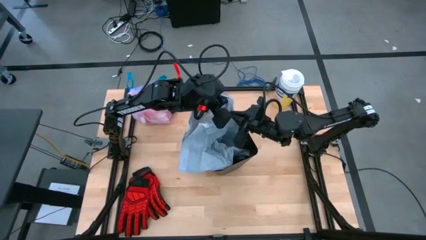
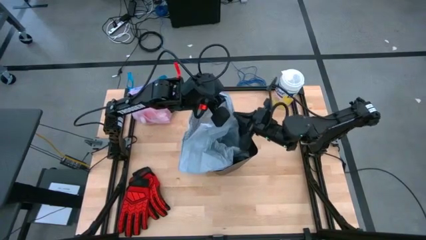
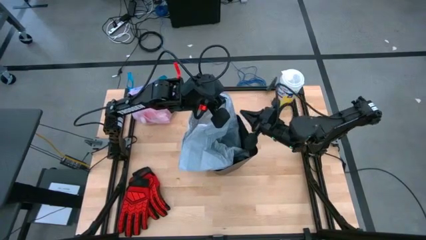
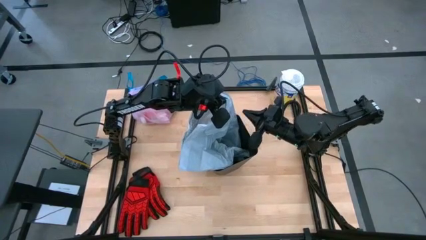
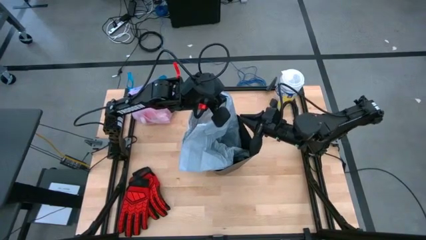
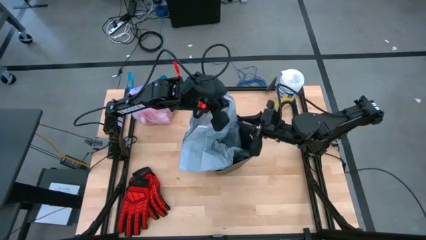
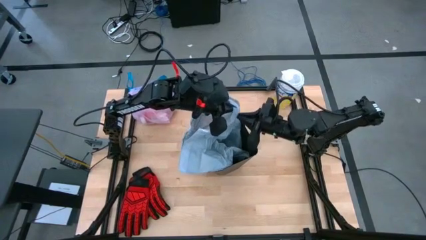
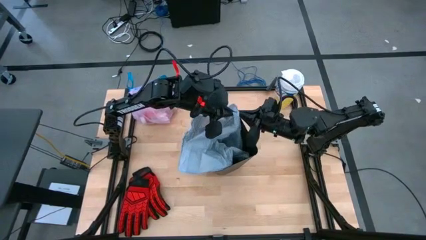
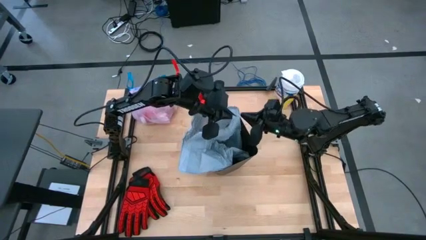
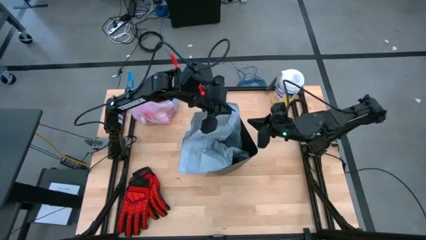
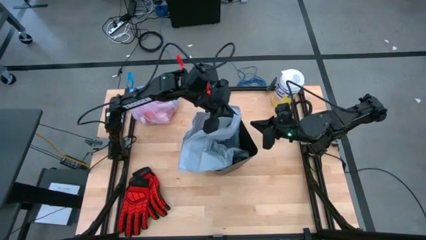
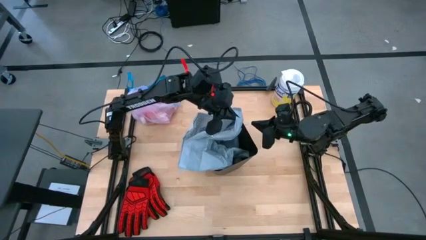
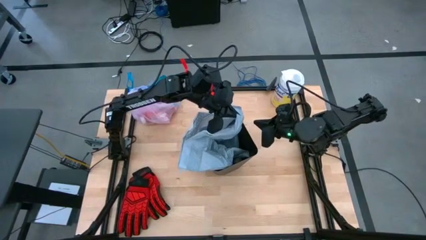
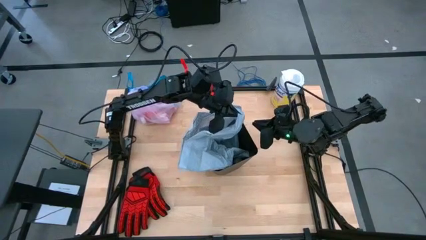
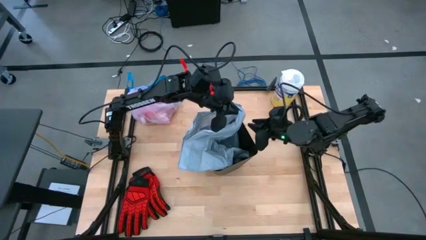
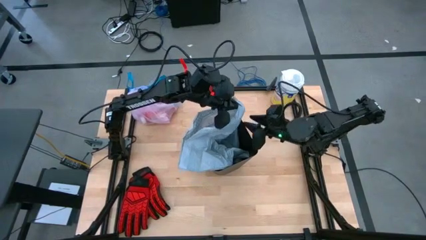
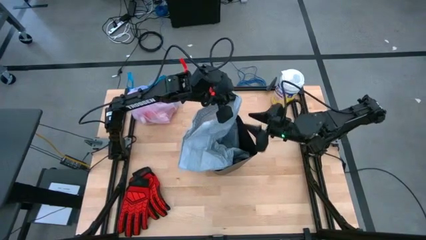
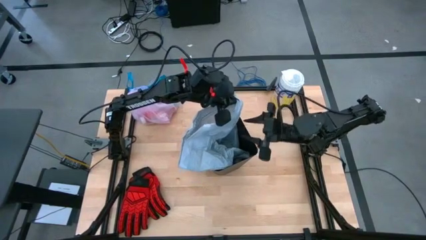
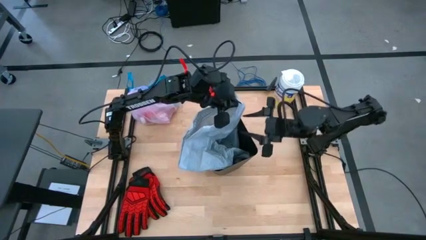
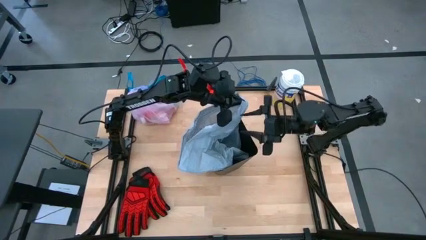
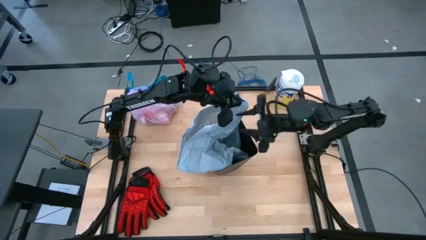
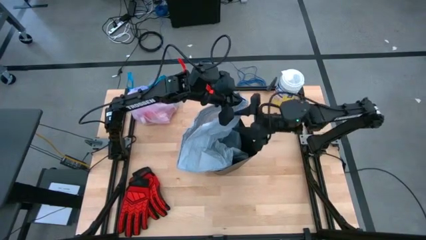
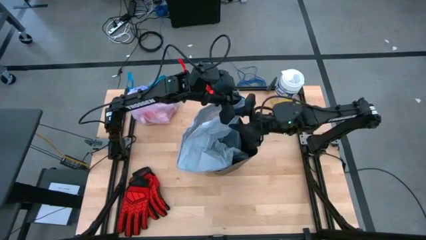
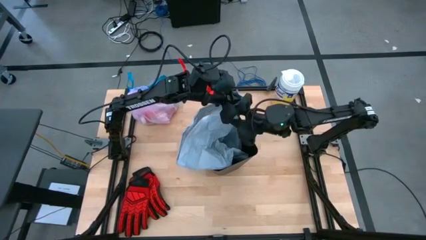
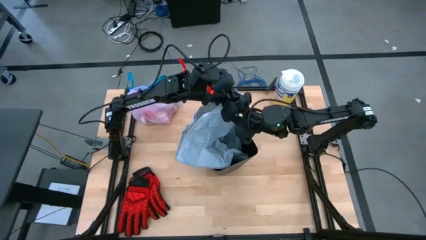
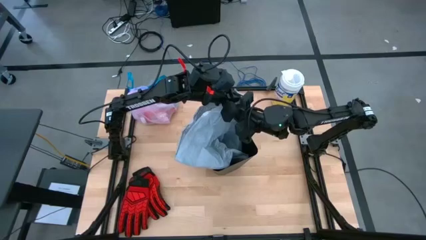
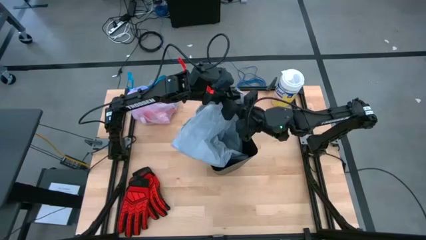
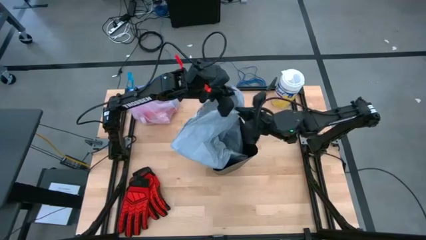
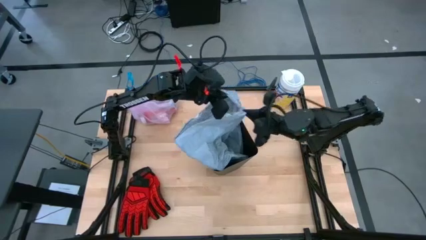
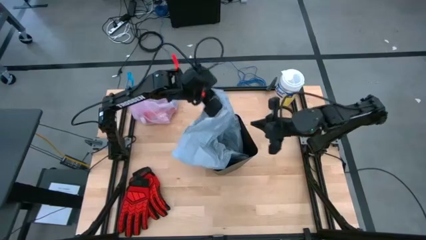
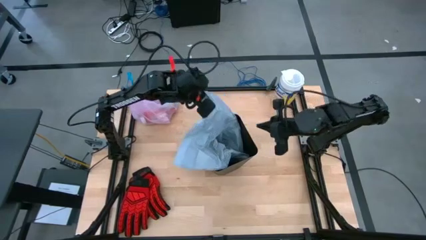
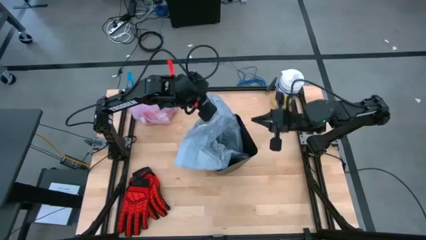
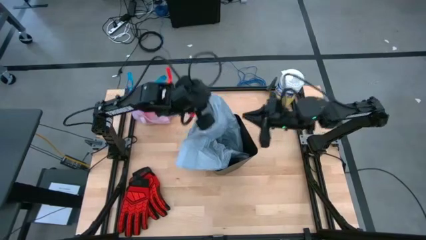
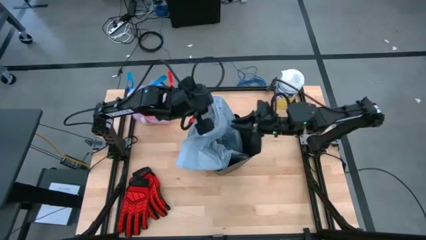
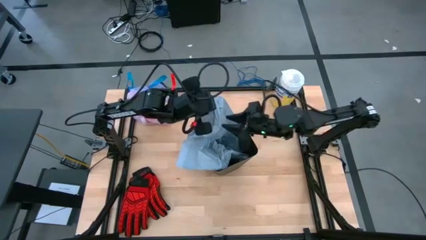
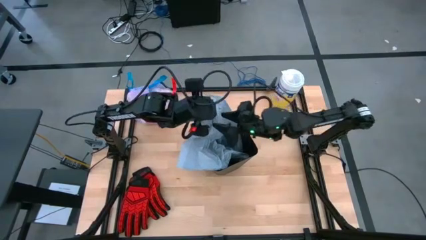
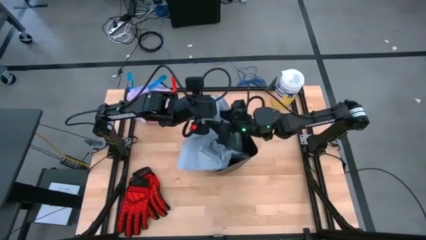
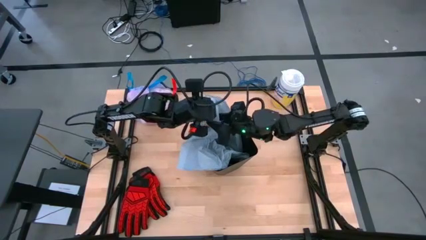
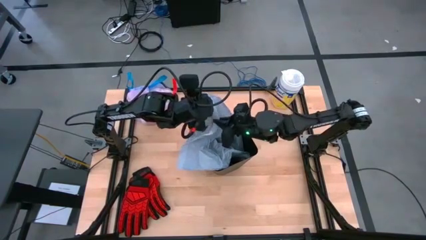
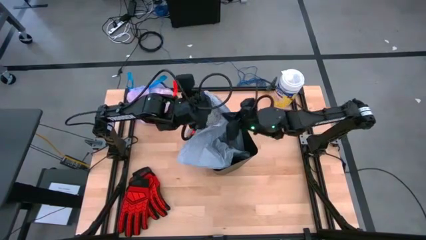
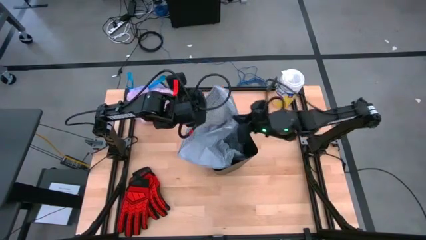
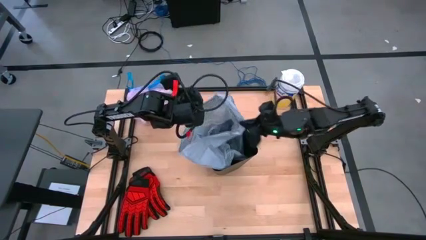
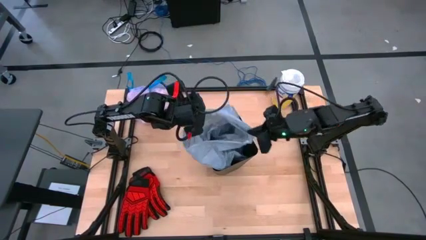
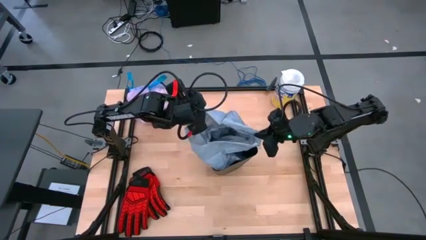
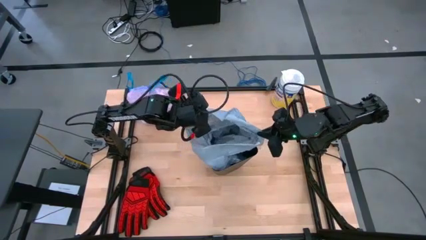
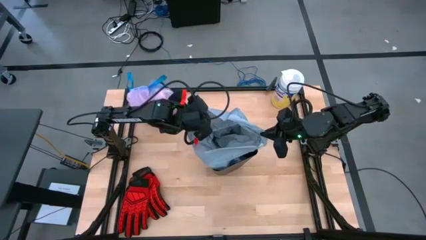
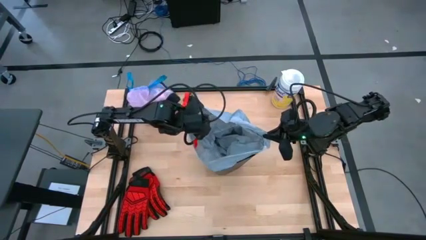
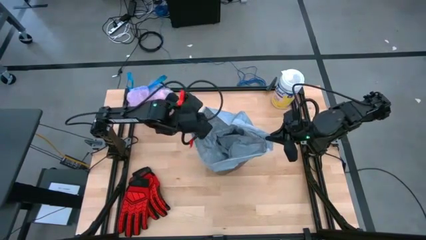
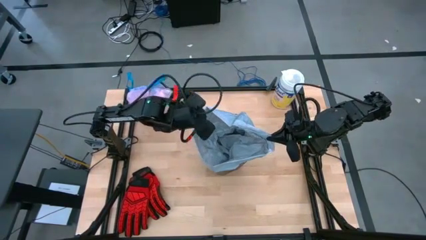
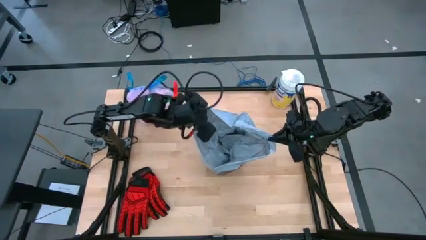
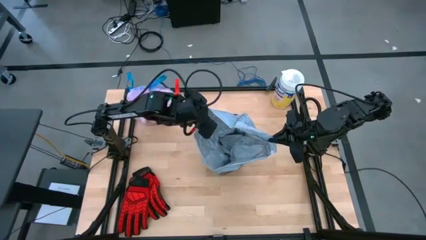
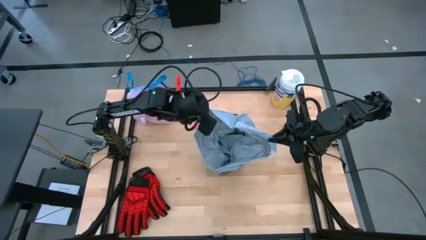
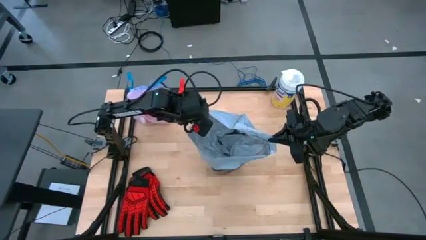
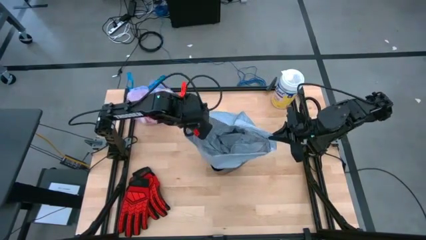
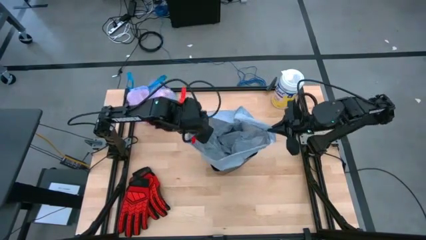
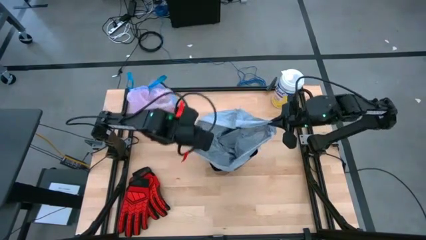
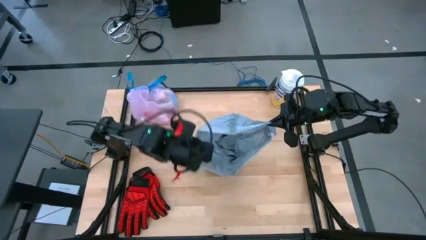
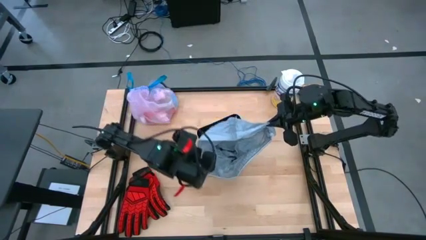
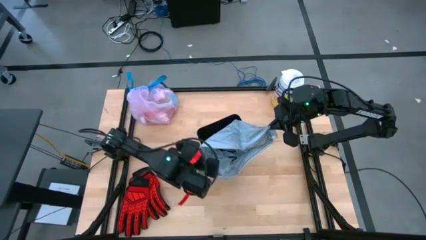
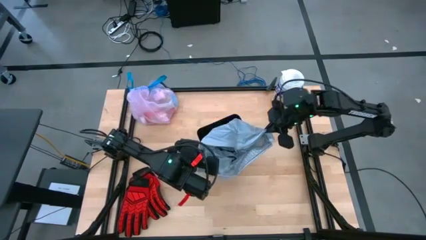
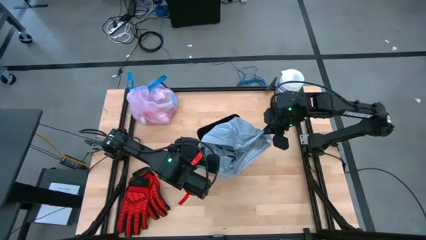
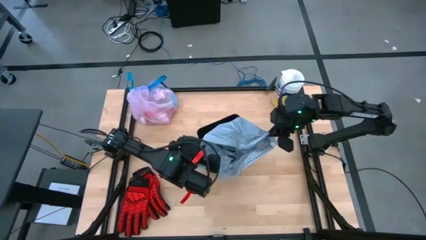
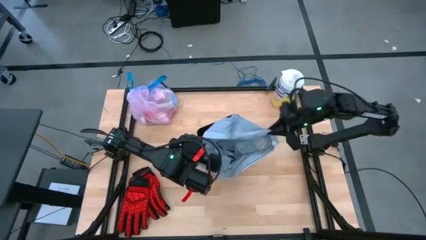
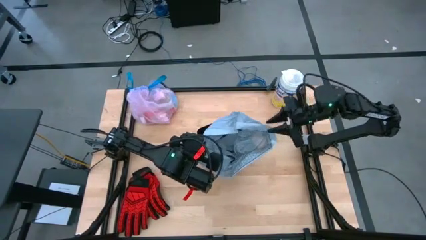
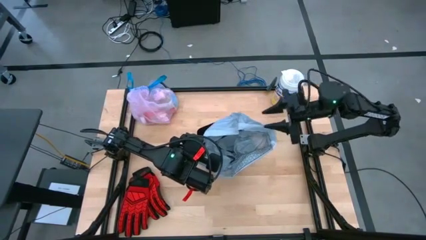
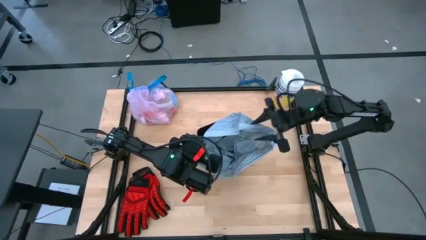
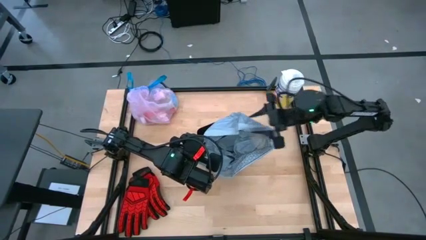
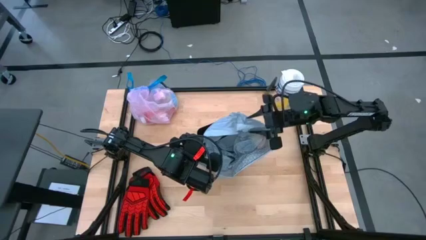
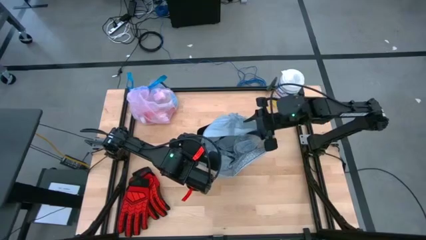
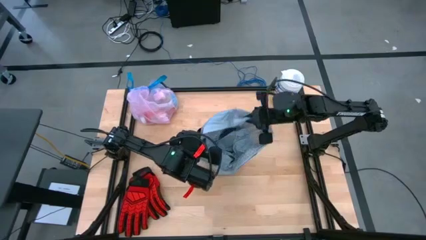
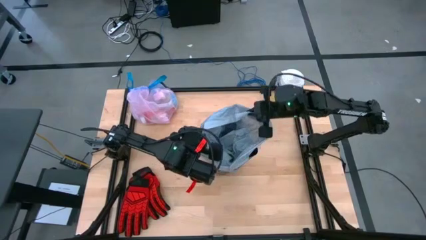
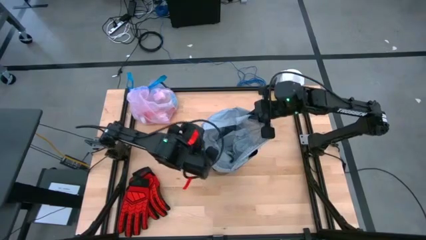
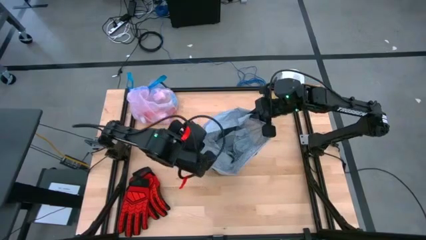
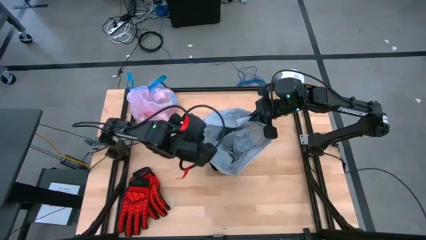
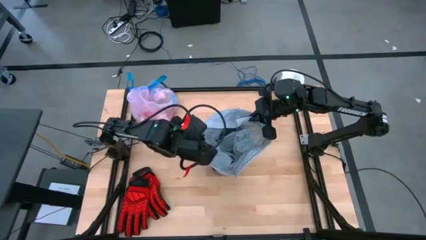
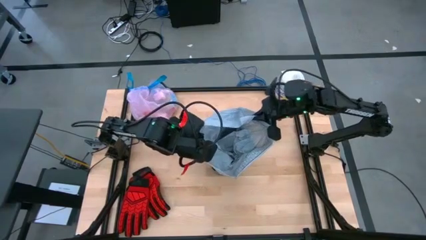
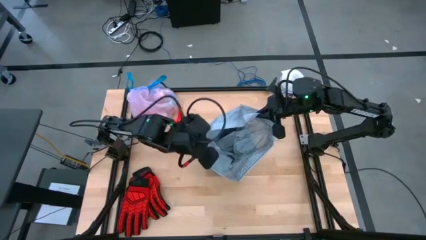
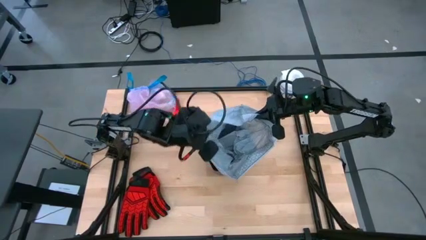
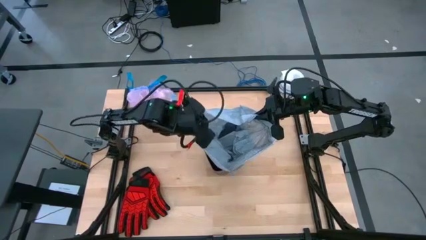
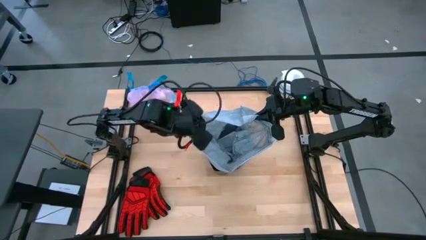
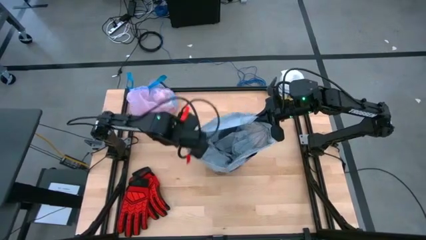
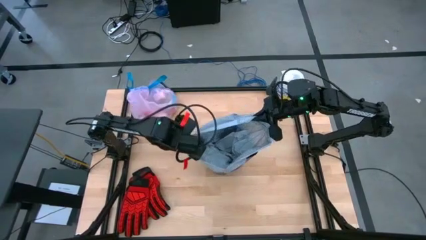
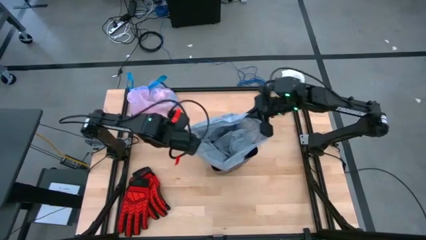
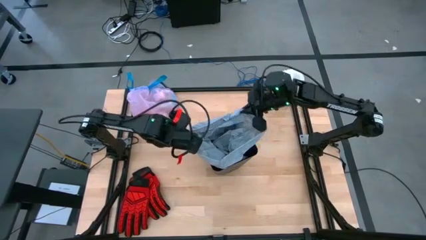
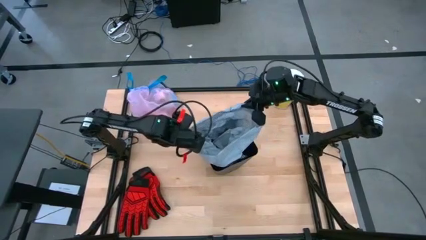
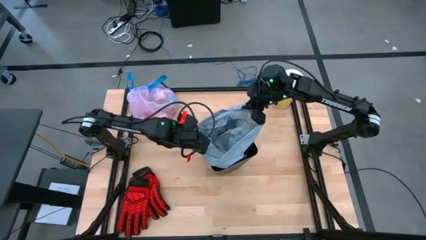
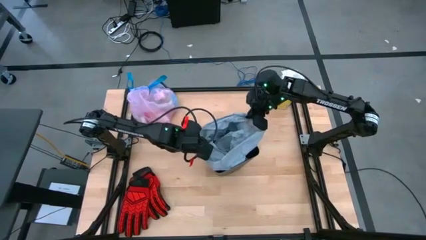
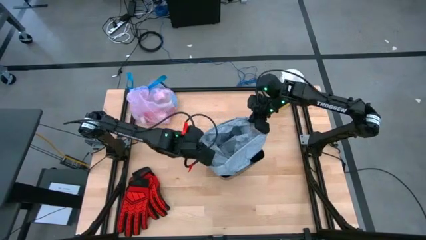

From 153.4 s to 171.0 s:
Task: place trash/remove bag and relplace
Put the gray trash bag into the trash bin
